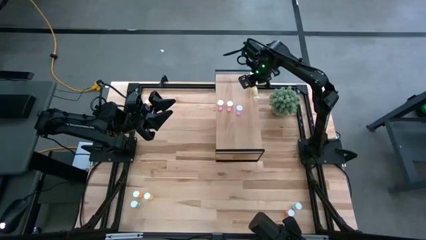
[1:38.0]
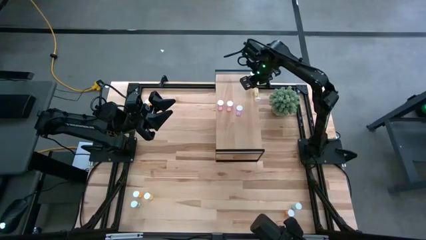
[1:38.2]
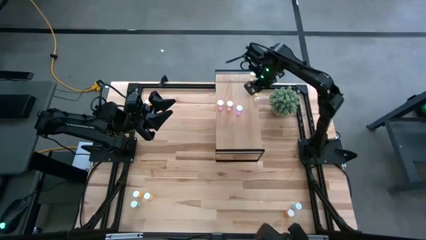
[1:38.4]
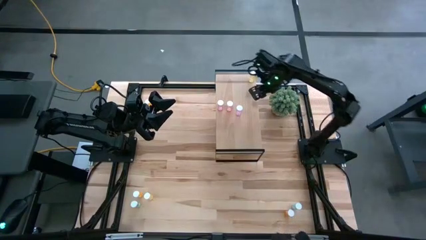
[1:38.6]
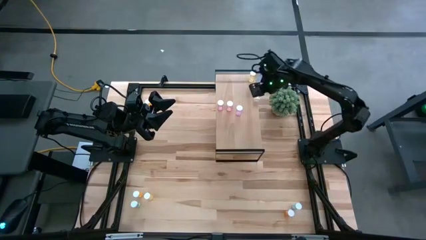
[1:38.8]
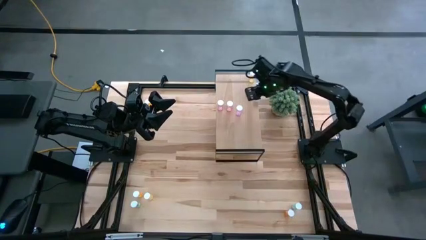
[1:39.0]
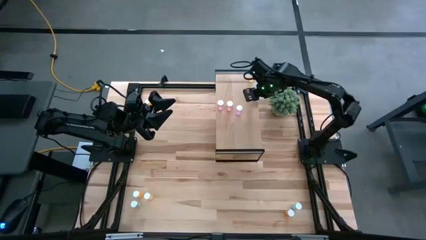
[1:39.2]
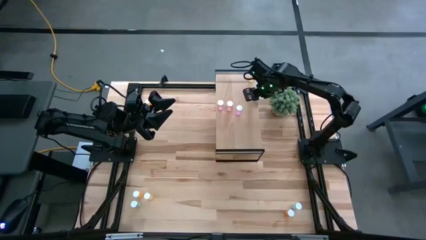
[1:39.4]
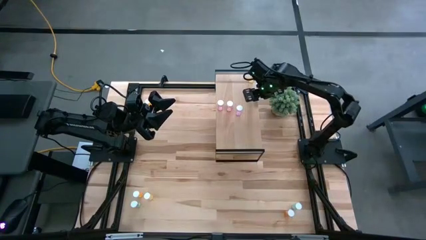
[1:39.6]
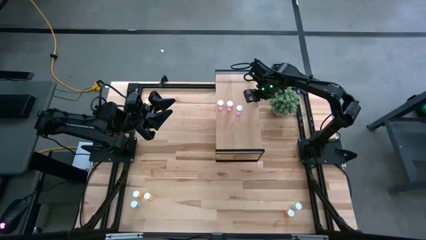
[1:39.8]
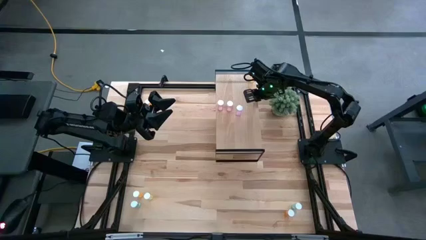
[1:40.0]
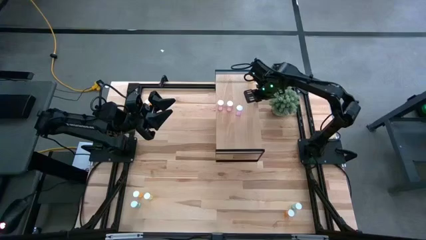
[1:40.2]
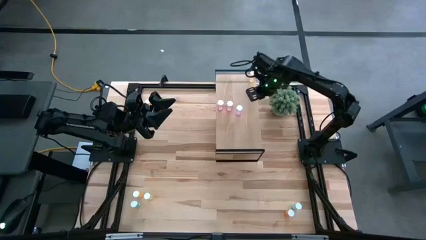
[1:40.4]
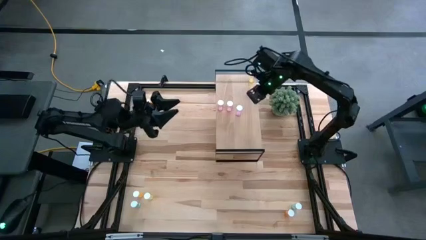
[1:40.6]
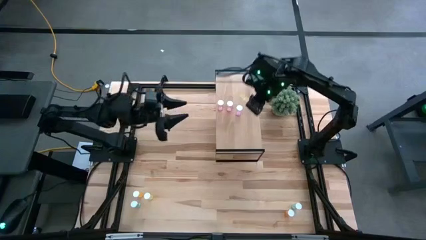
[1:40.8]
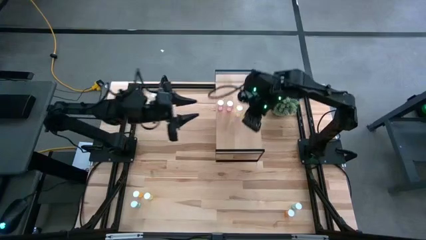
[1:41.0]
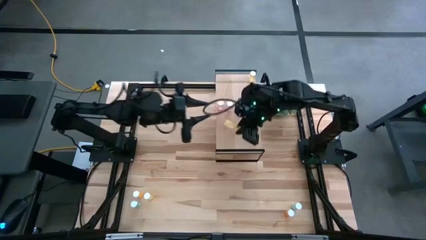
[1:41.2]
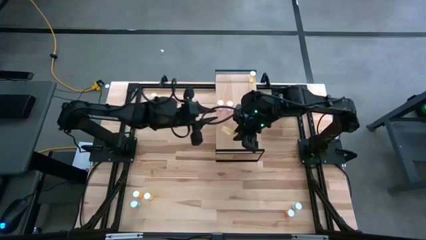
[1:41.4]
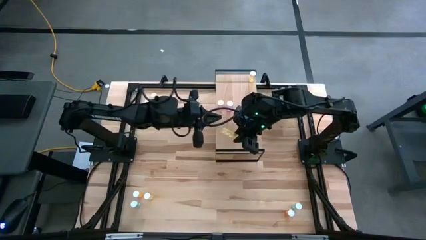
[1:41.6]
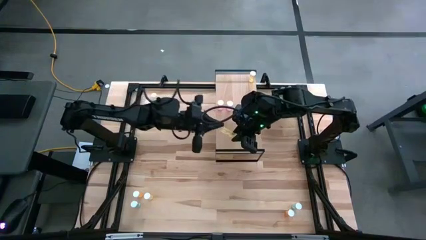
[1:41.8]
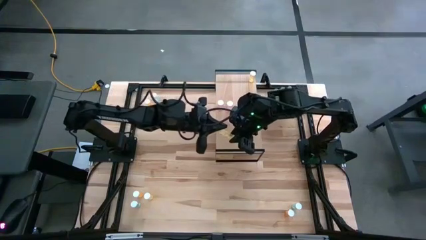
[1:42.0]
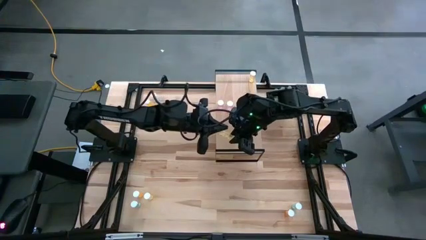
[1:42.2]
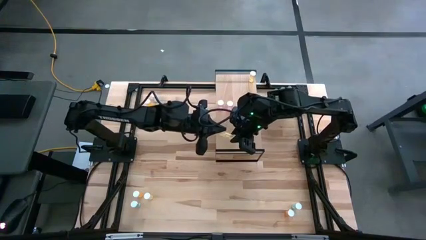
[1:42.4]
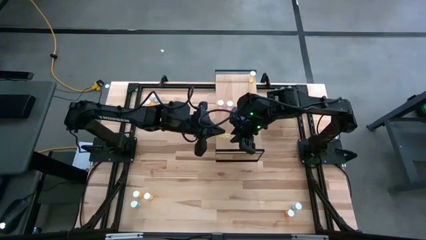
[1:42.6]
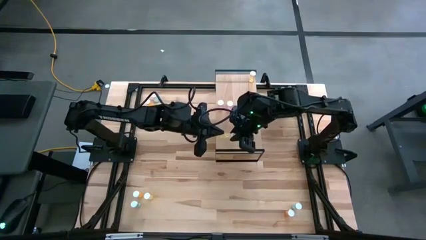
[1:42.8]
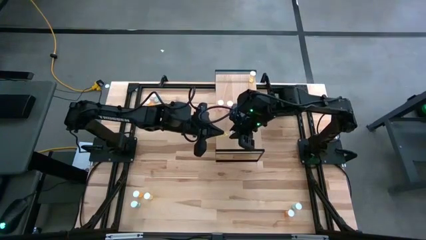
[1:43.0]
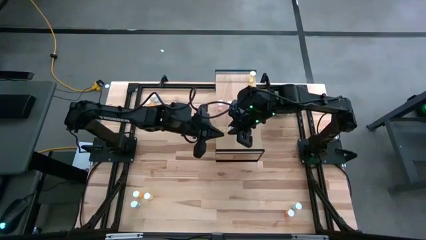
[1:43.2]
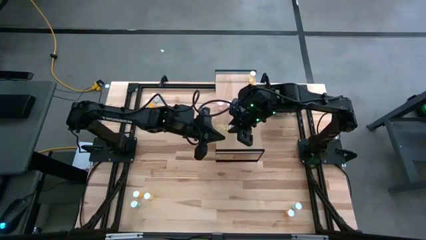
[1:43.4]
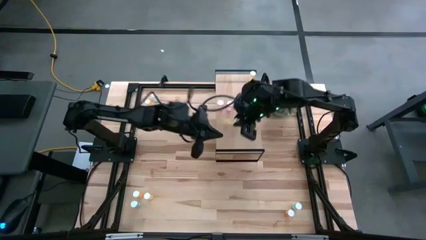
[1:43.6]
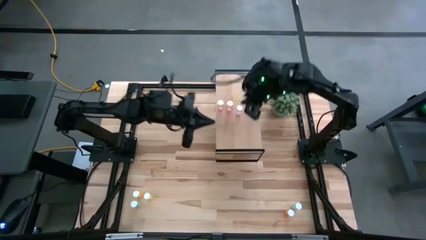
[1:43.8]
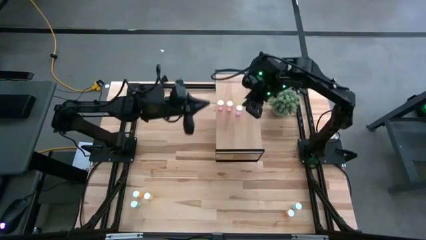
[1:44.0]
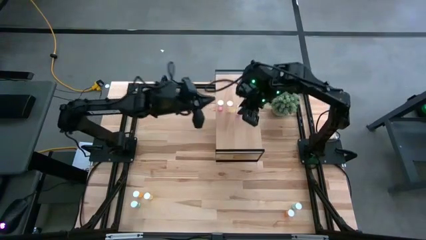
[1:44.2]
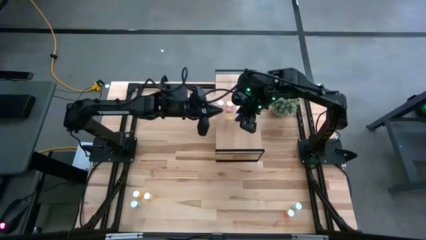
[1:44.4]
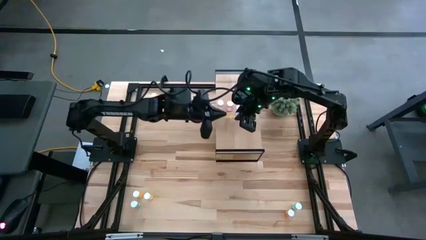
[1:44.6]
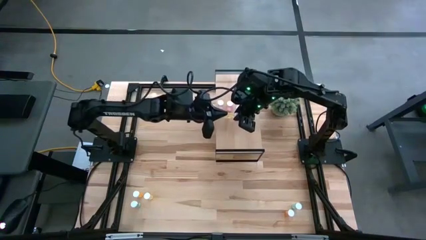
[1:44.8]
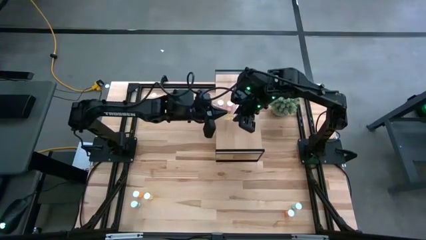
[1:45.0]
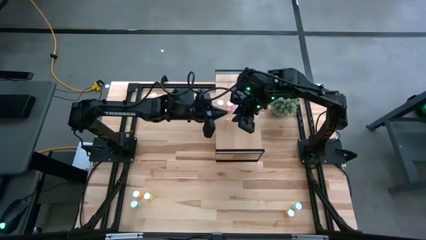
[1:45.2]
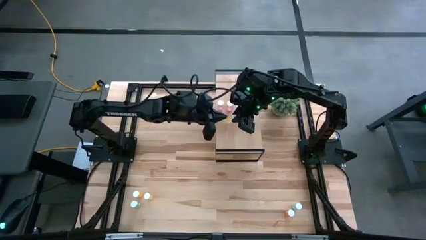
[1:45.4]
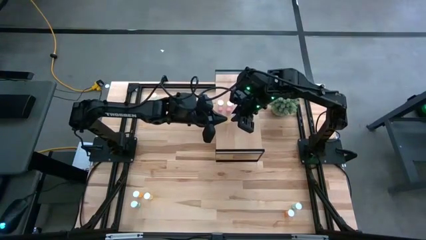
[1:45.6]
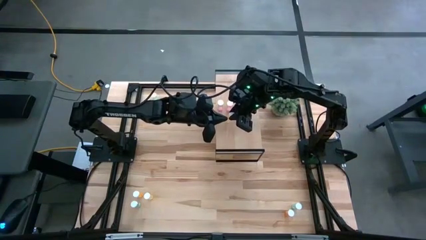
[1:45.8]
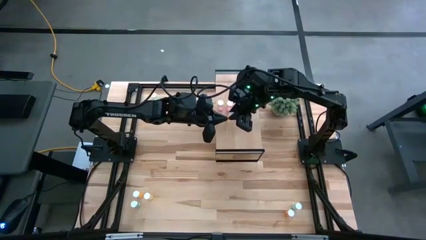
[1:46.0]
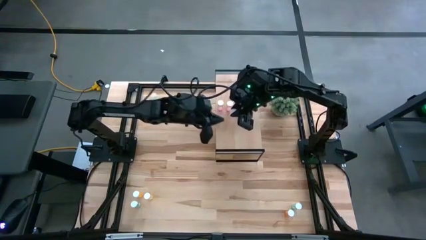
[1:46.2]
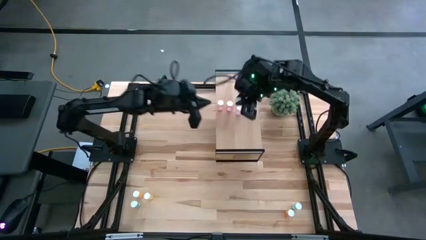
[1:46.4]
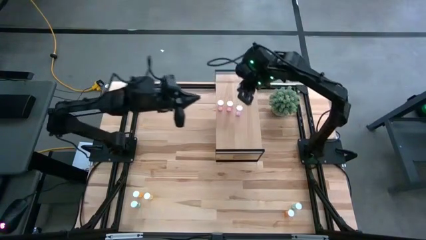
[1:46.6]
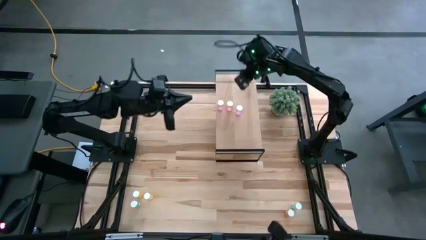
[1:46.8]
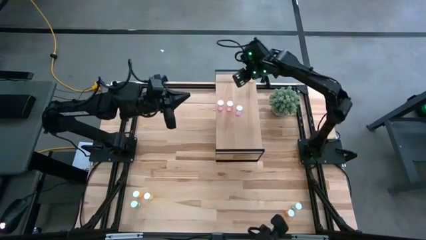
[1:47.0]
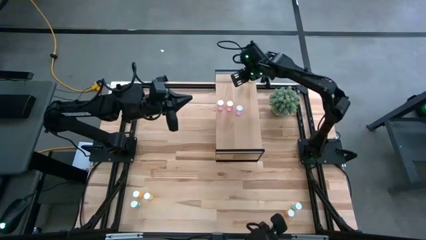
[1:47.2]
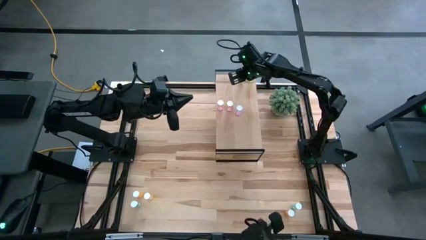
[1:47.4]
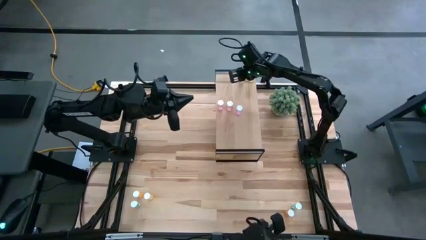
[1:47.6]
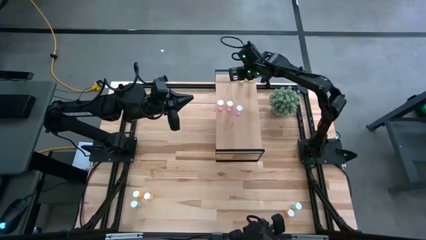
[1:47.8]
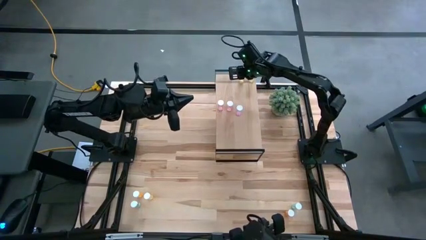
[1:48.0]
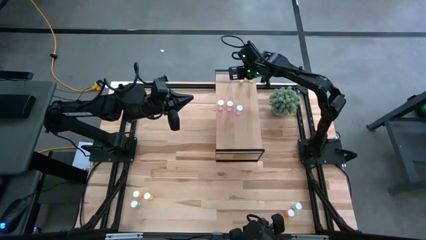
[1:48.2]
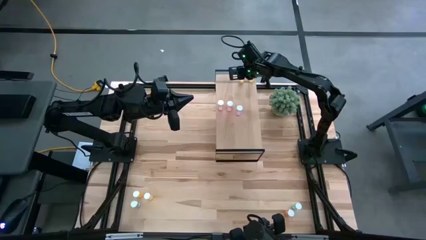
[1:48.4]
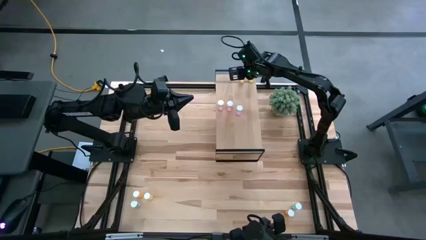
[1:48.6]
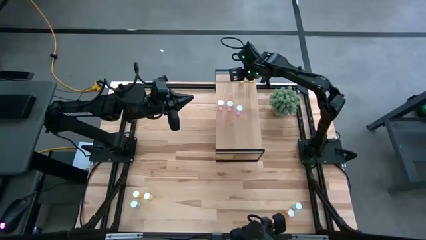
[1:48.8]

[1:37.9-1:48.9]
Task: Pick and place medicine bottles onto shelf by color
Put the bottom yellow pill bottle on the shelf aligned with the other yellow pill bottle

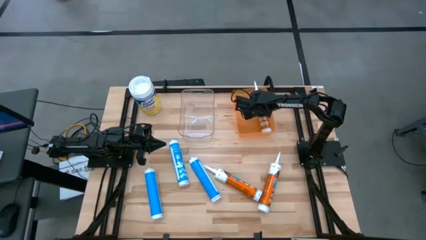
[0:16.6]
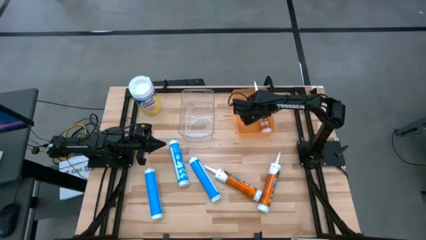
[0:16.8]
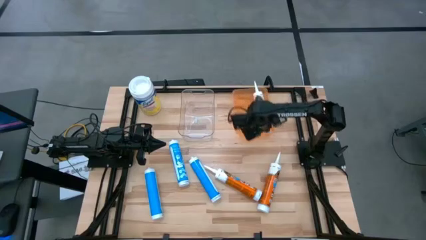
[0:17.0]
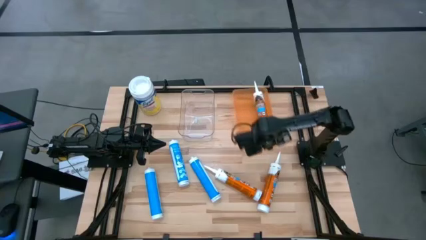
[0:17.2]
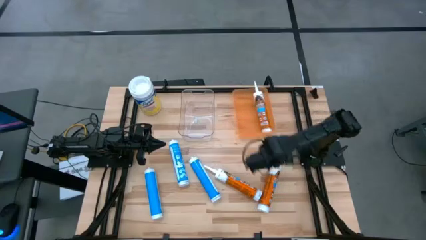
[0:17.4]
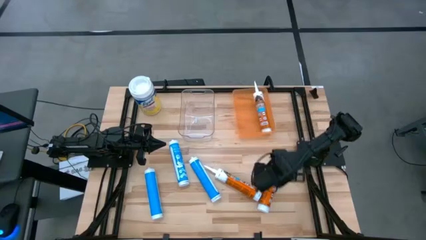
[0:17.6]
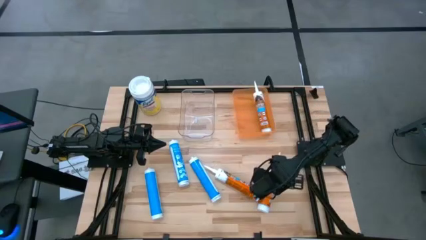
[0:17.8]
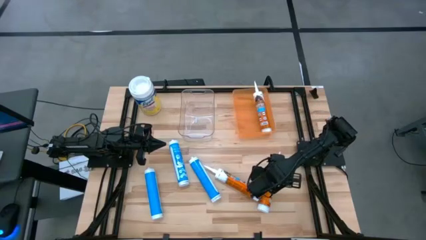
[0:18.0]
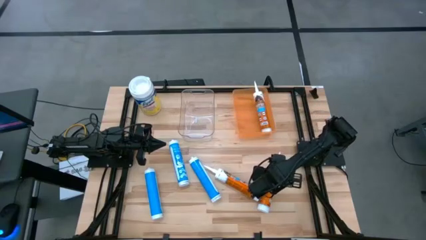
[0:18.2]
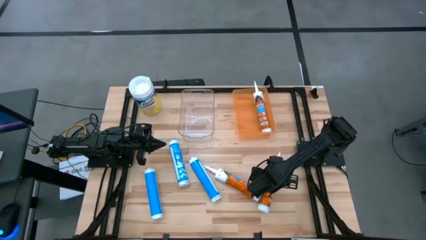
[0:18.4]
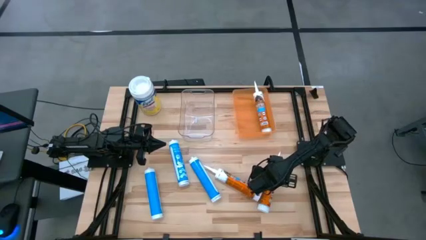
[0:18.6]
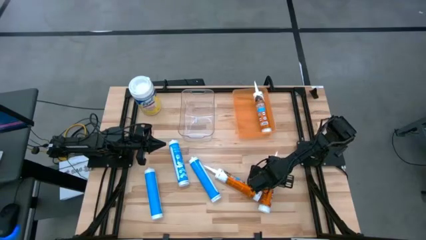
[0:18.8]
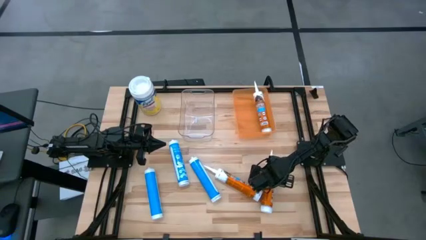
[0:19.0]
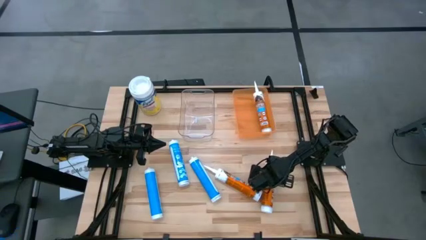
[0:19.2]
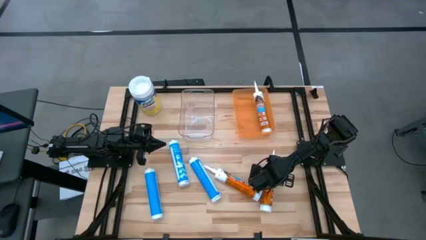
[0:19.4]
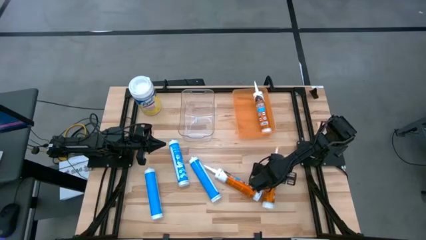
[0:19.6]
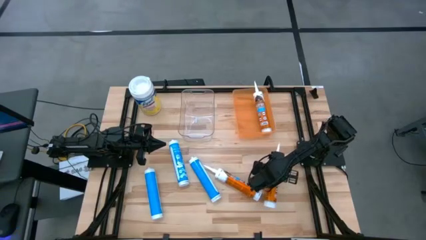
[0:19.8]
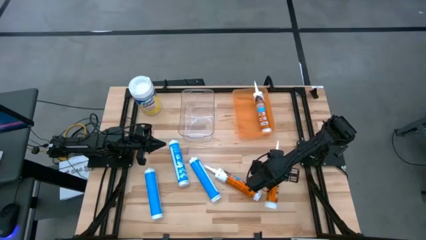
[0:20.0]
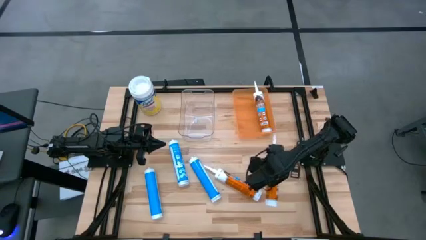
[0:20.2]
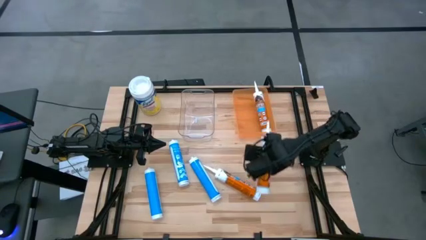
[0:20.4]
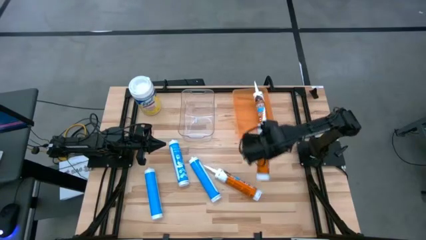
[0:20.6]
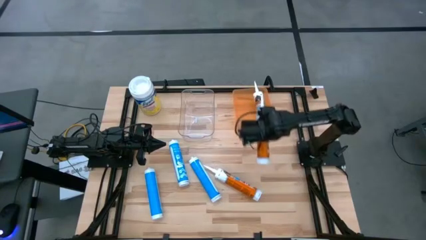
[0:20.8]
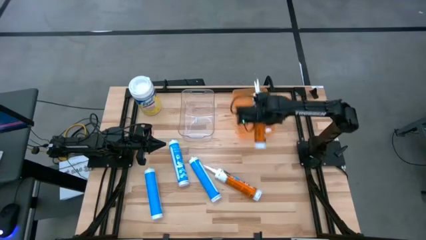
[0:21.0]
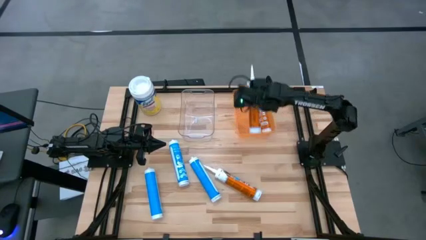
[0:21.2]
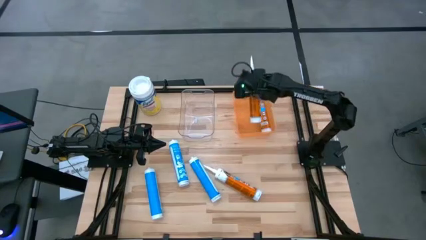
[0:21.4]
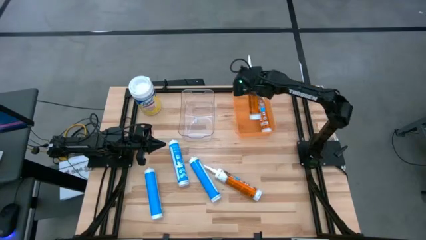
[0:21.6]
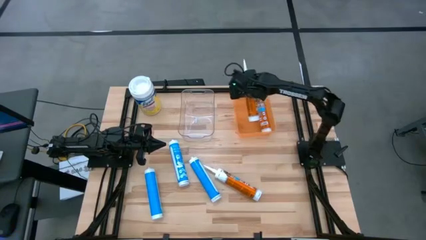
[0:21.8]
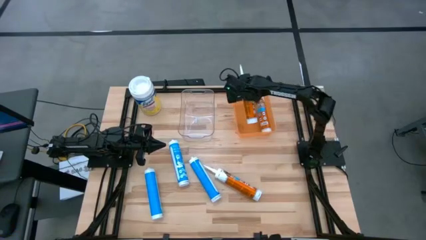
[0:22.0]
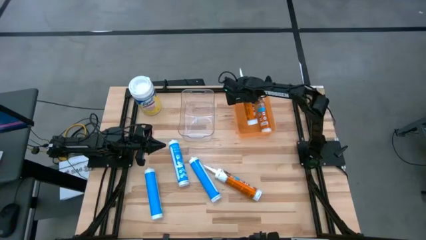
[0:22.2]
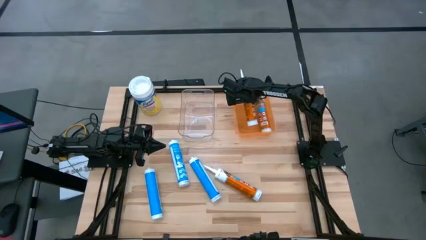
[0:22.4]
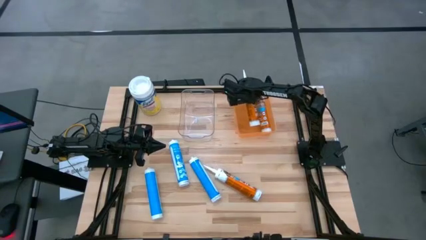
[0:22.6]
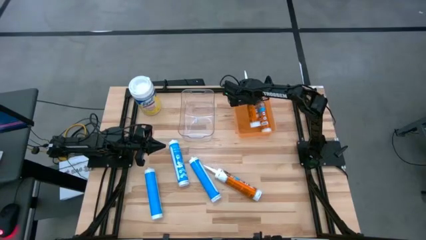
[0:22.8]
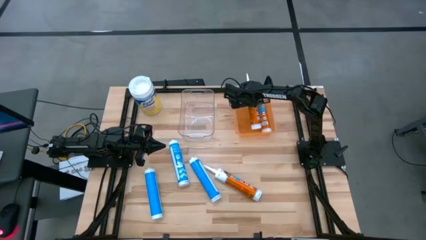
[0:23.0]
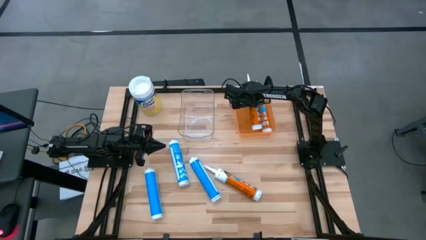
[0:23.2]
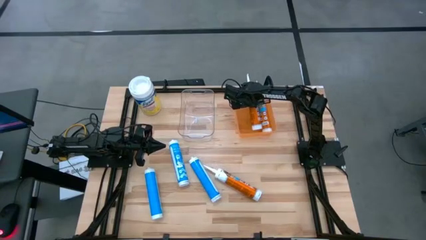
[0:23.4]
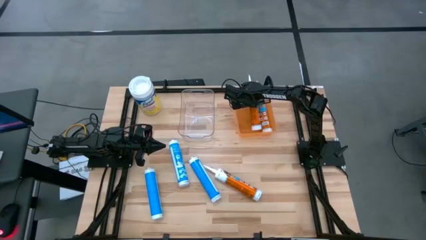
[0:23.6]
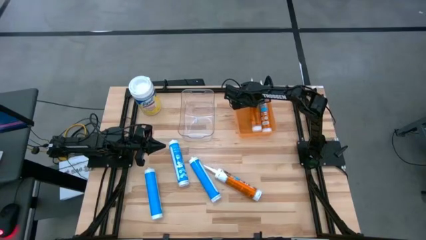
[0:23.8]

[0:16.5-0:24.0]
Task: Pick & place silicon tubes, Sealant and Lysol wipes
Put the right orange sealant into the orange bin
